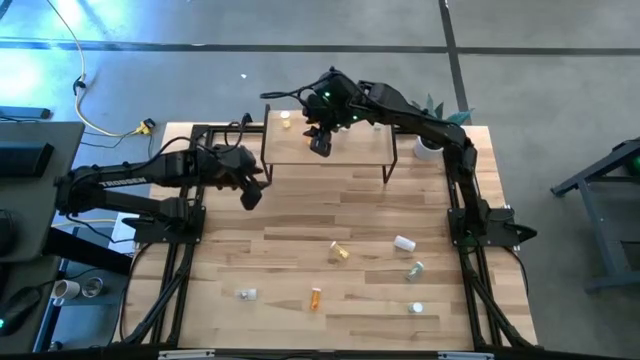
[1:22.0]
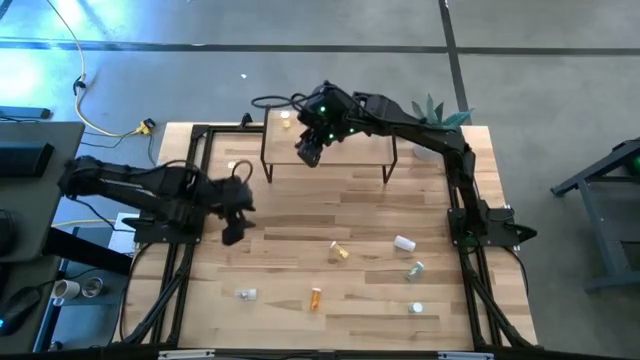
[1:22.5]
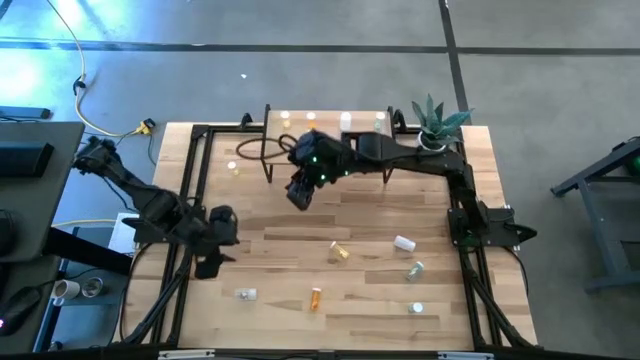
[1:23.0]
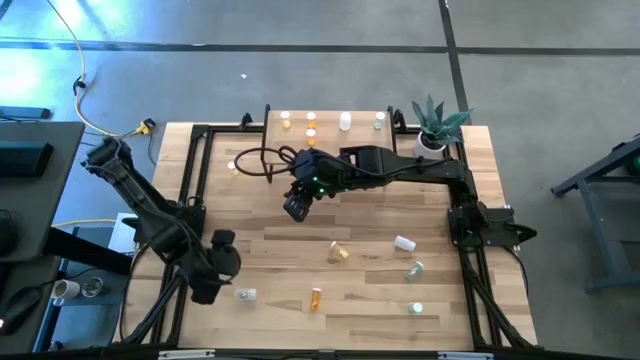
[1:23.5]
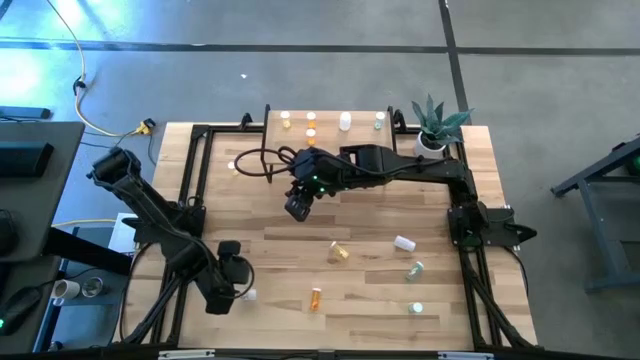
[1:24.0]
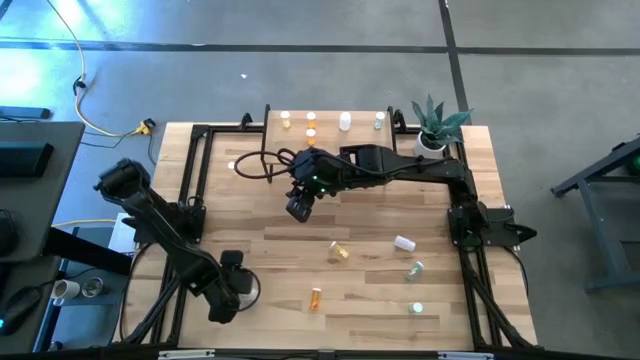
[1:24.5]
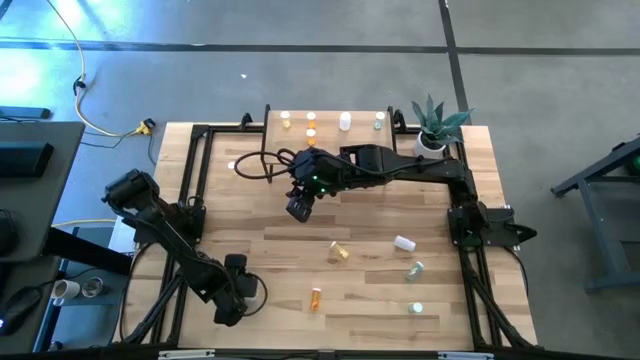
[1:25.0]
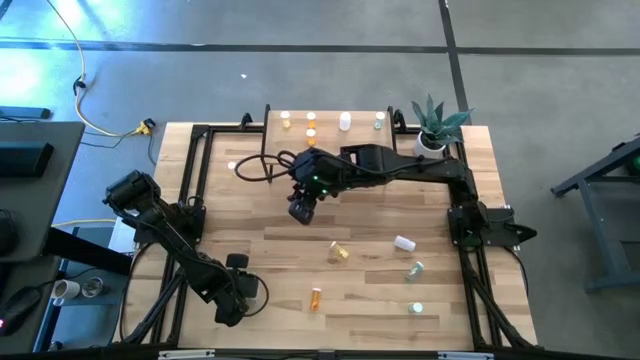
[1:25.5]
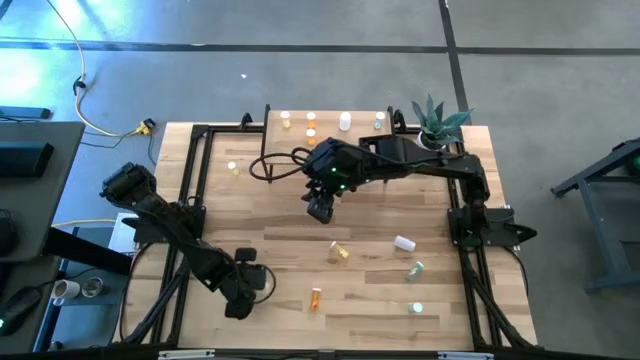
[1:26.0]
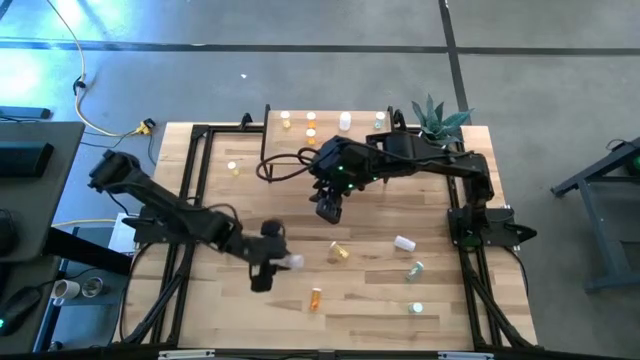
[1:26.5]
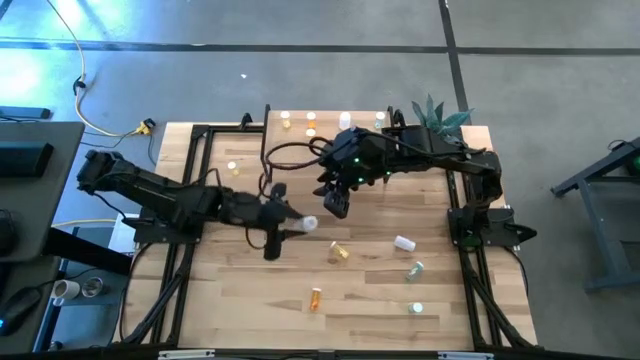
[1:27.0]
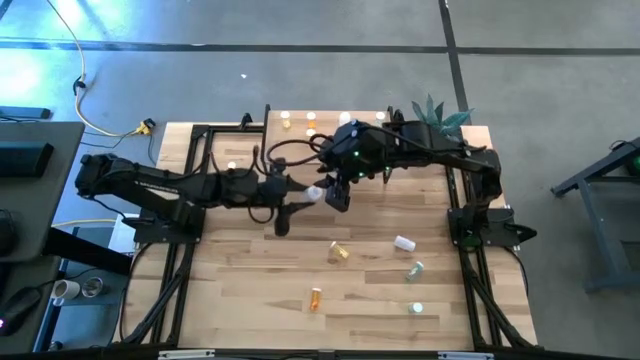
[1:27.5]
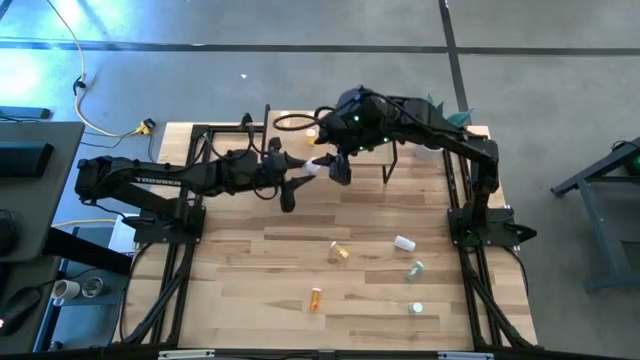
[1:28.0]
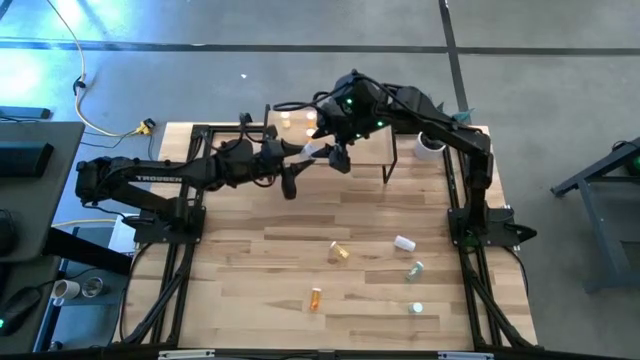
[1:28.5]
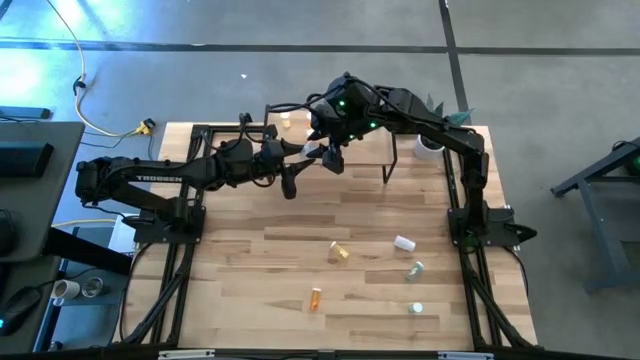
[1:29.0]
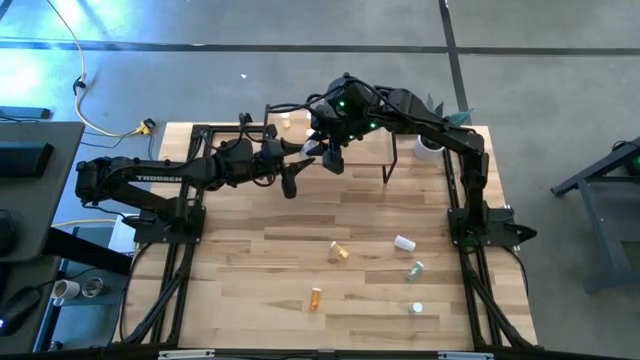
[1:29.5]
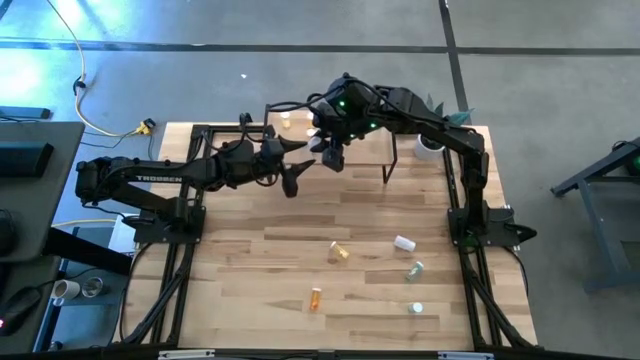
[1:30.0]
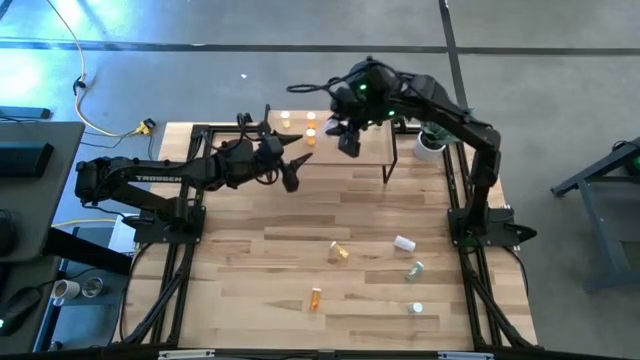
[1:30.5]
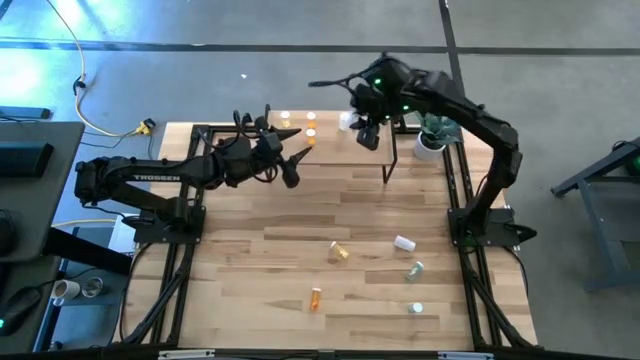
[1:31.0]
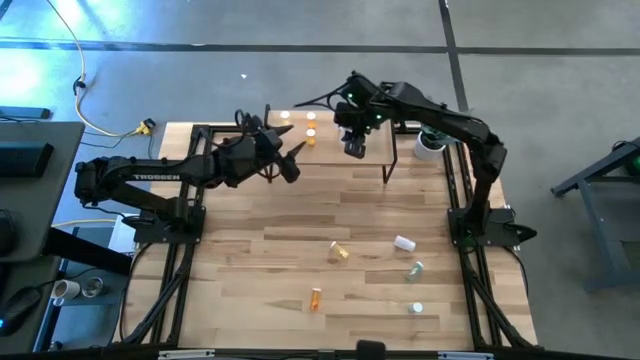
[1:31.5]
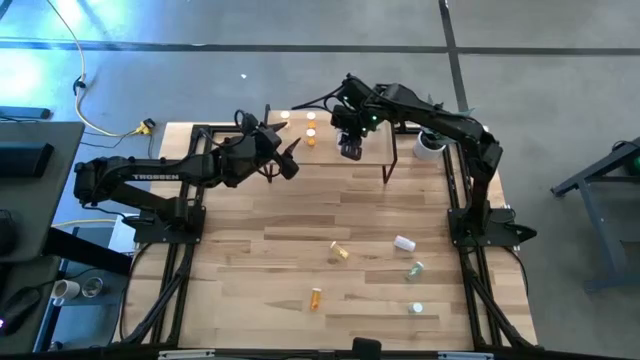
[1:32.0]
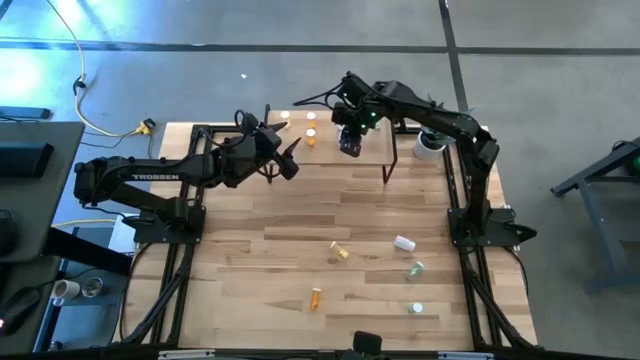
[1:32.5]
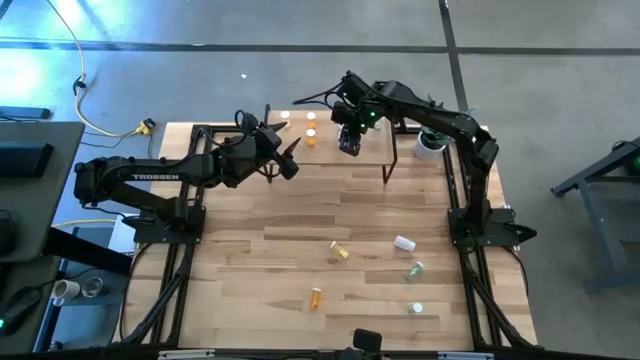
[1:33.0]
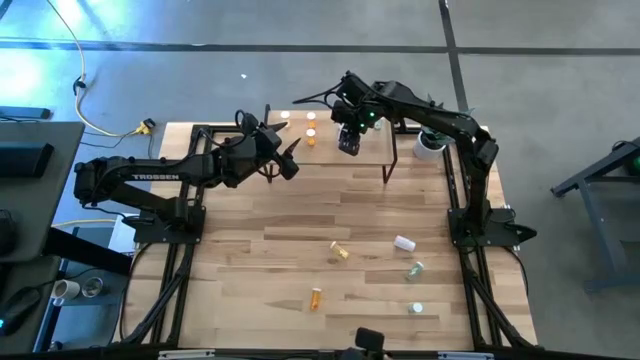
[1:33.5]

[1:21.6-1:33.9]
Task: Pick and place medicine bottles onto shelf by color
Put the bottom white pill bottle on the shelf and align it to the other white pill bottle

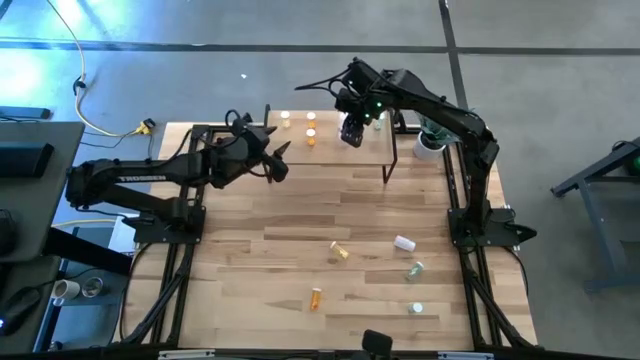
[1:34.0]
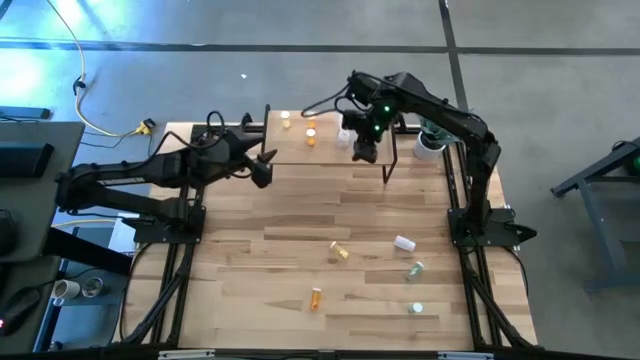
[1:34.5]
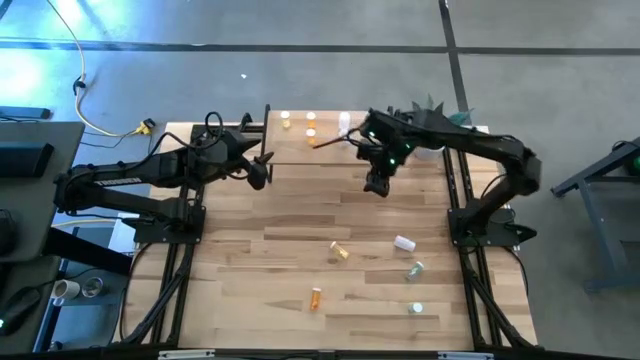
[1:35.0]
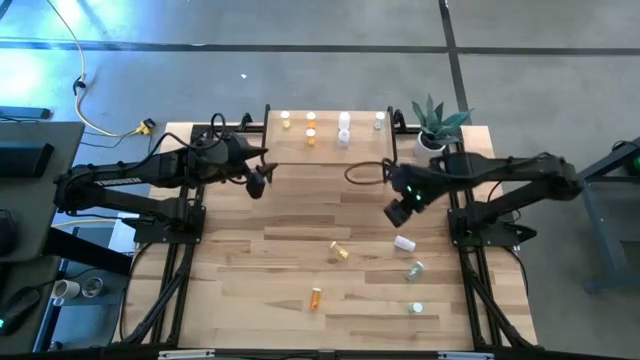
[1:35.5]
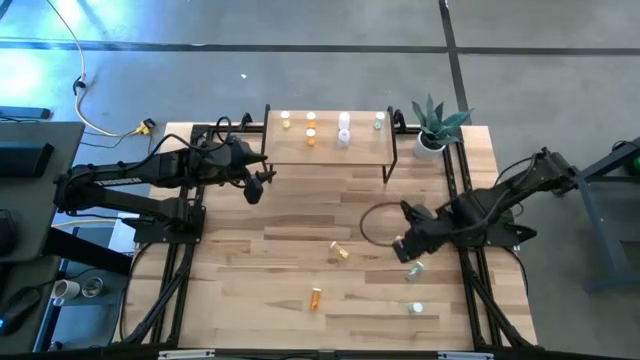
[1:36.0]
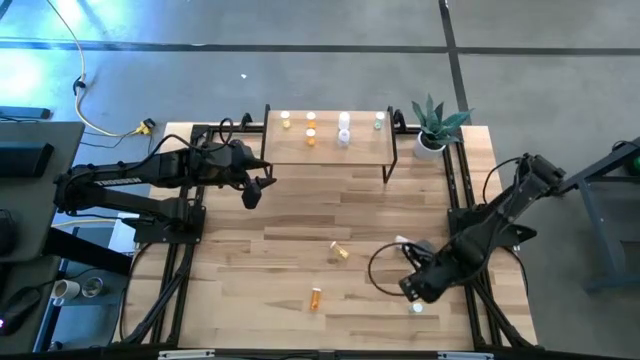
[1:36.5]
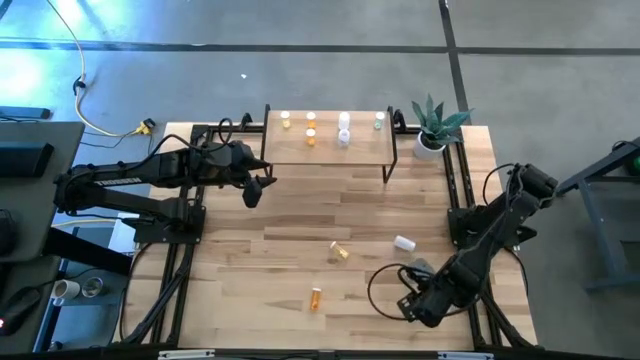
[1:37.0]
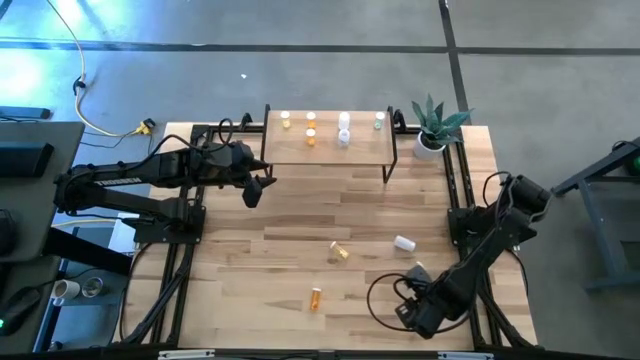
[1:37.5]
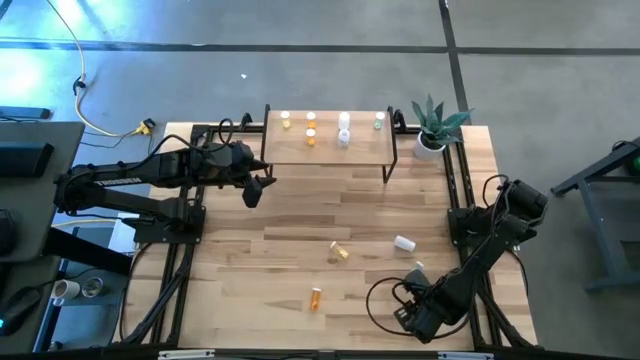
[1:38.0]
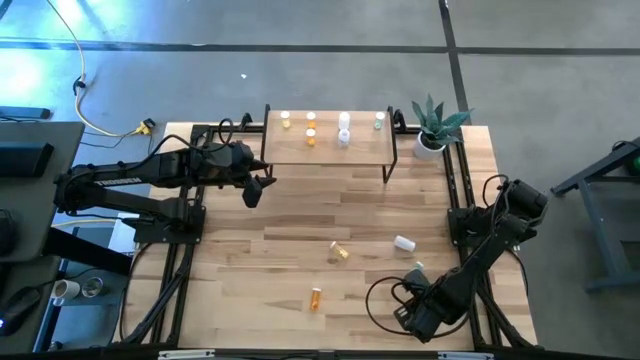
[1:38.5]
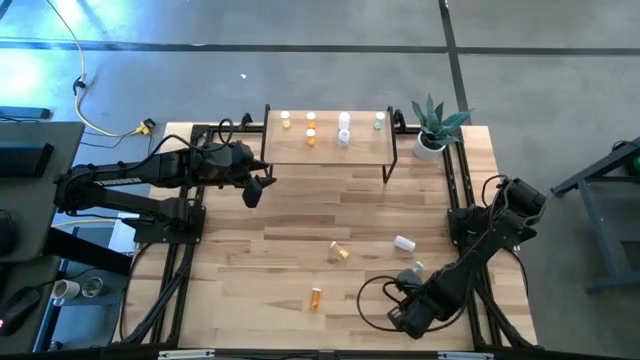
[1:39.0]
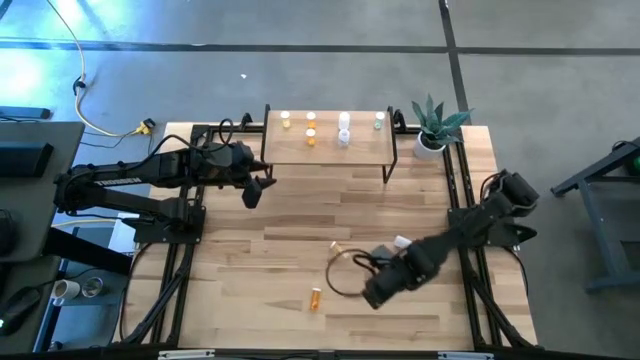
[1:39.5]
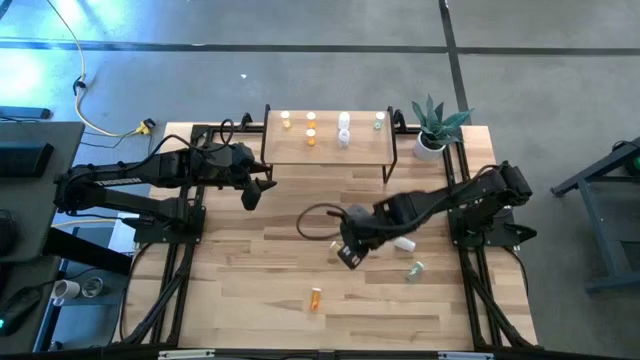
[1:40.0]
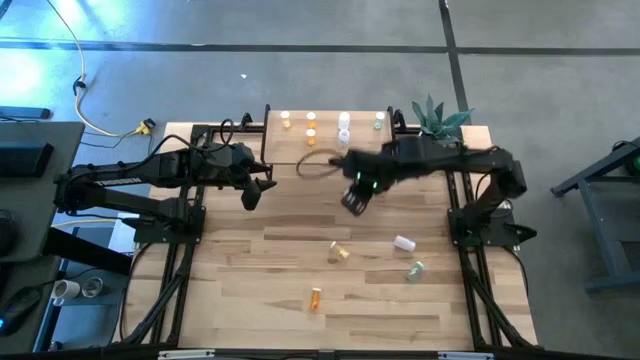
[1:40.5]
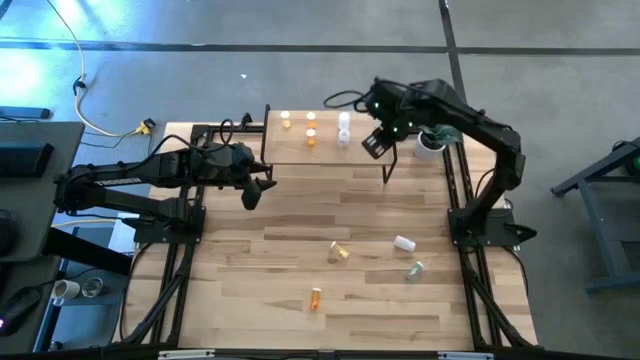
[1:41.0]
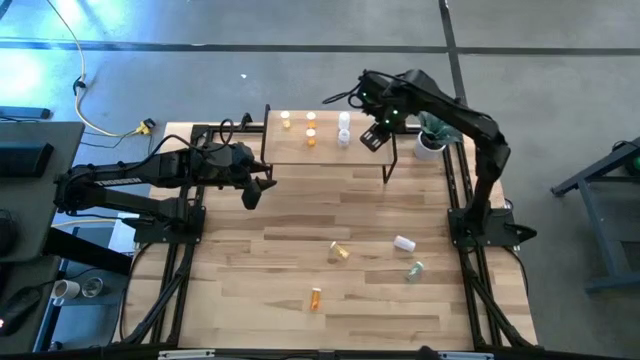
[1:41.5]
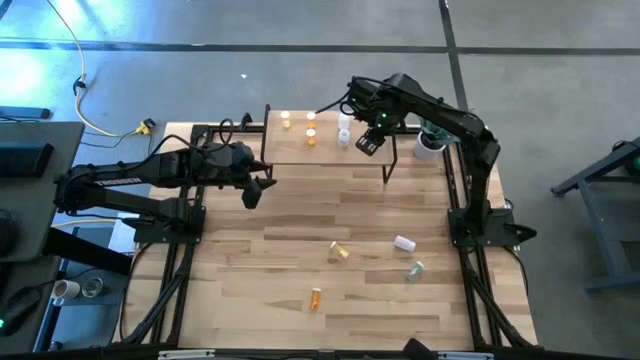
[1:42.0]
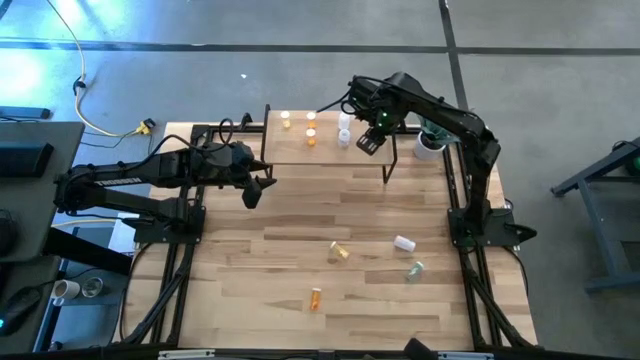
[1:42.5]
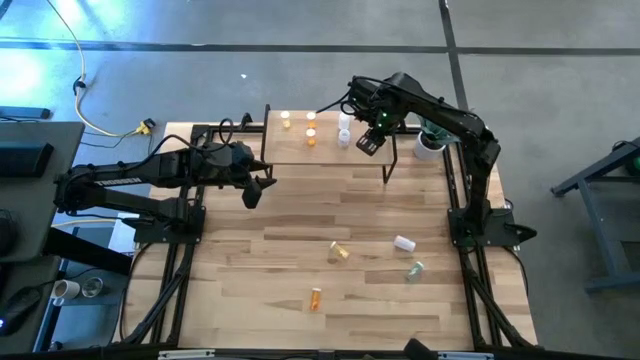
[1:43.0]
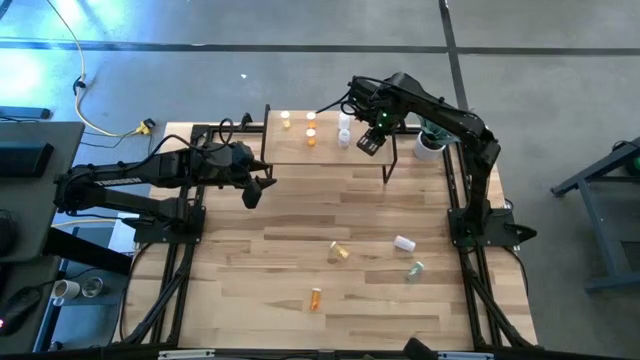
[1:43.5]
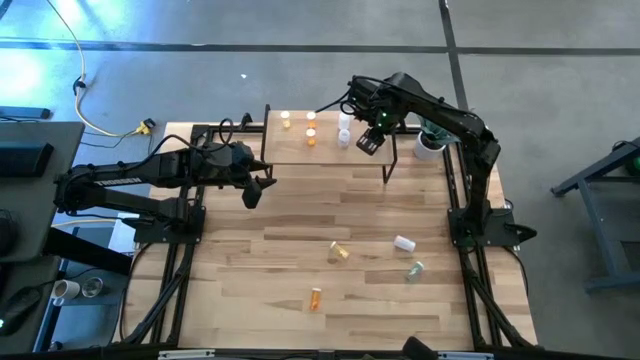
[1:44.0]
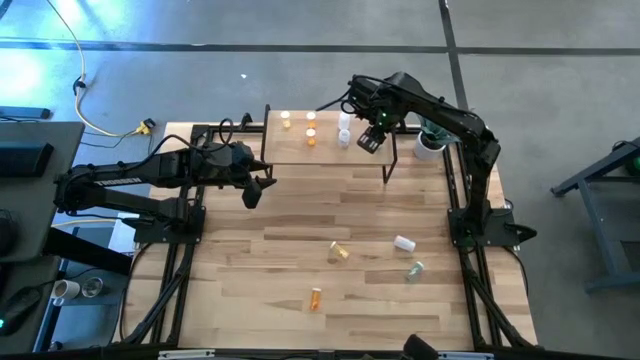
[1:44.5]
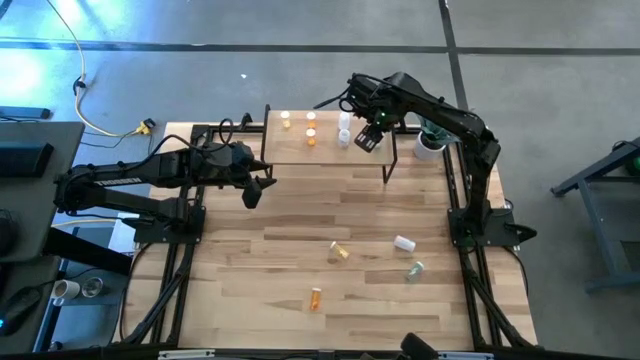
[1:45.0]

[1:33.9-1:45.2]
Put the bottom blue pill bottle on the shelf and align it to the other blue pill bottle
